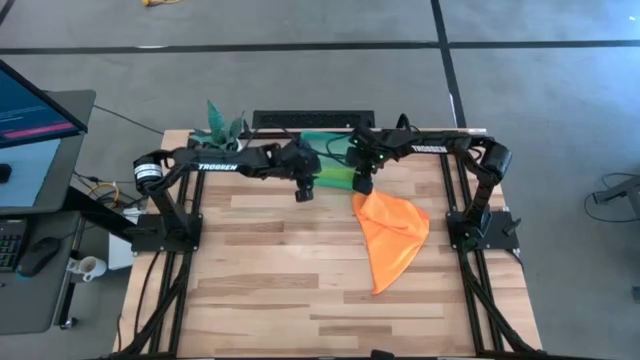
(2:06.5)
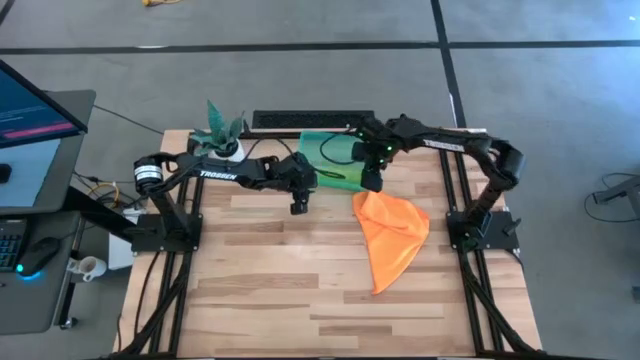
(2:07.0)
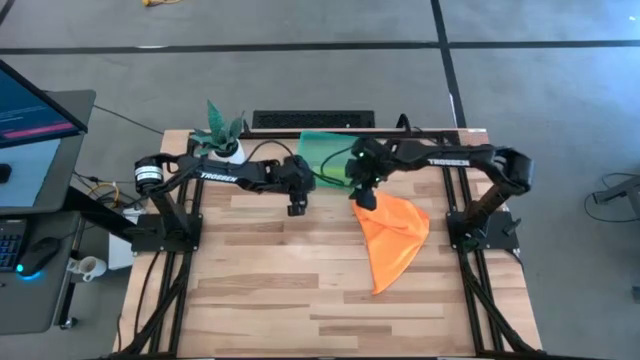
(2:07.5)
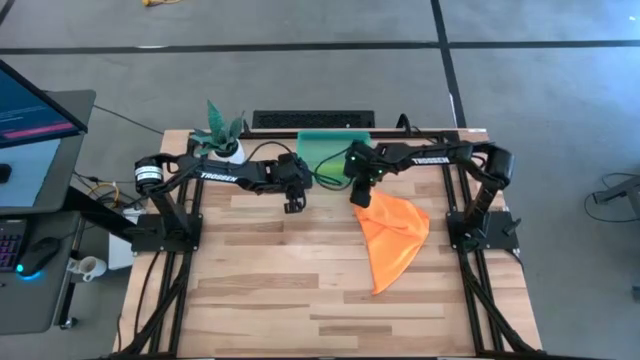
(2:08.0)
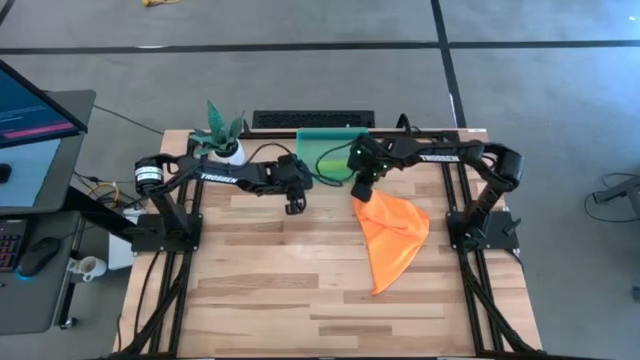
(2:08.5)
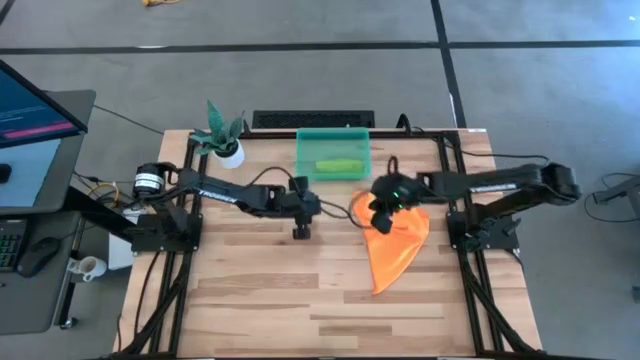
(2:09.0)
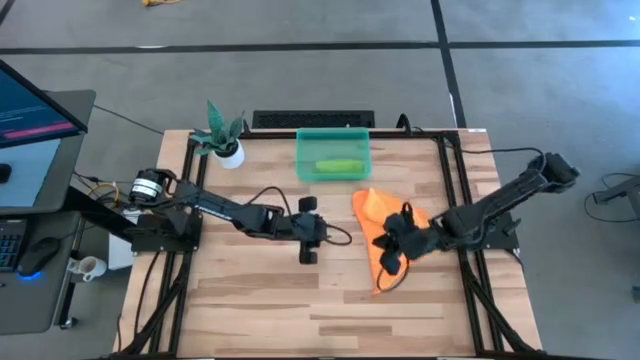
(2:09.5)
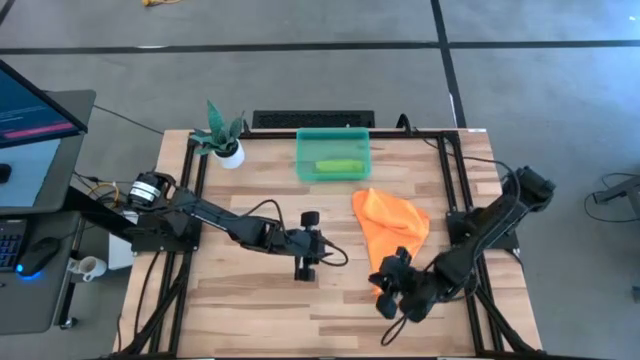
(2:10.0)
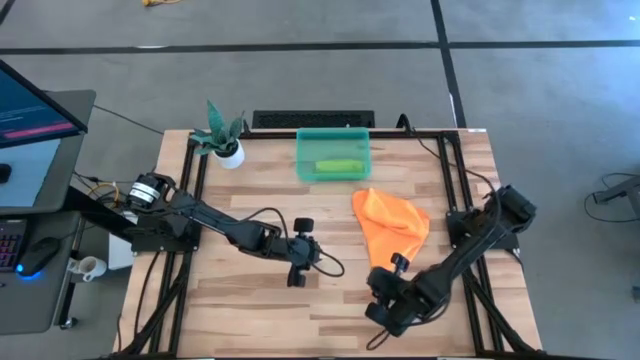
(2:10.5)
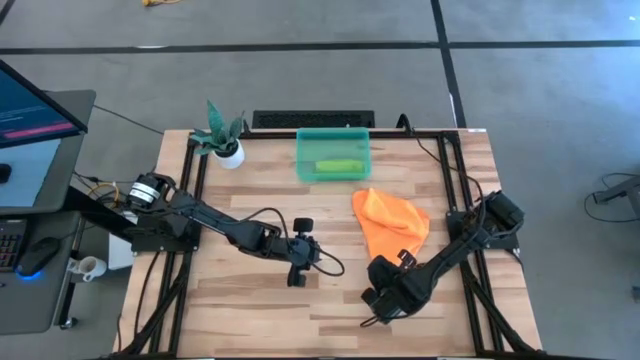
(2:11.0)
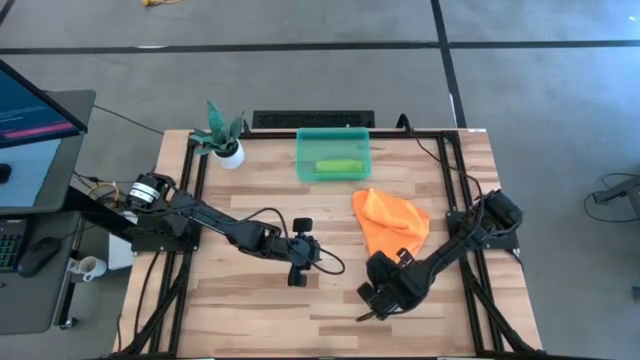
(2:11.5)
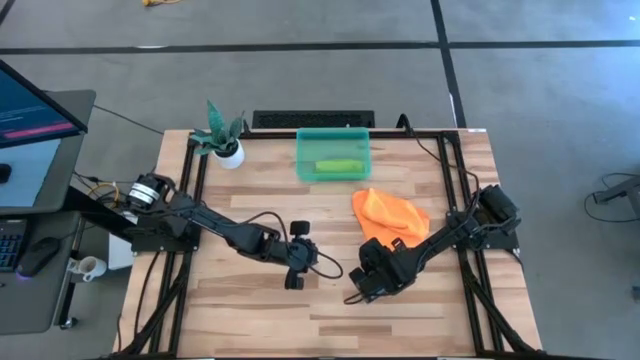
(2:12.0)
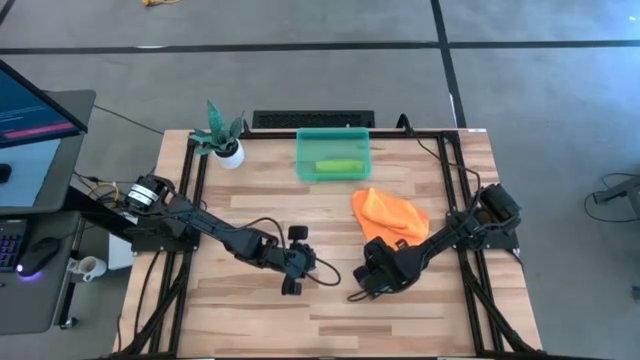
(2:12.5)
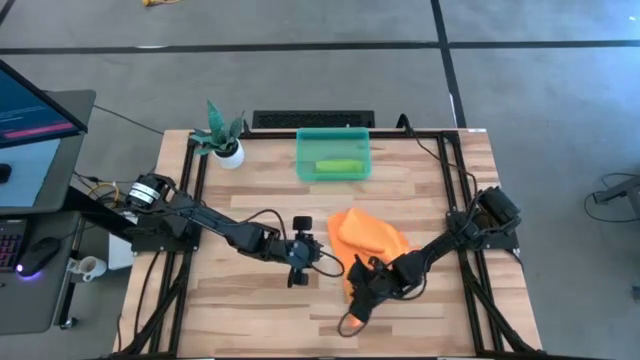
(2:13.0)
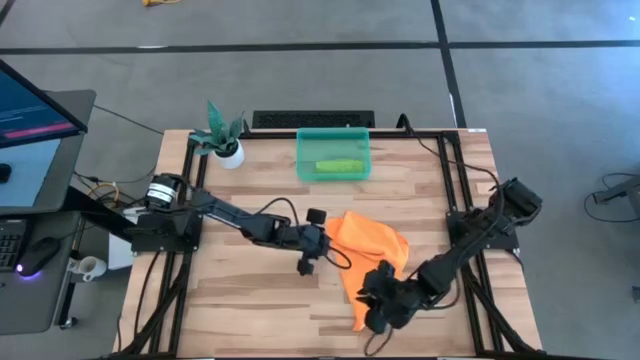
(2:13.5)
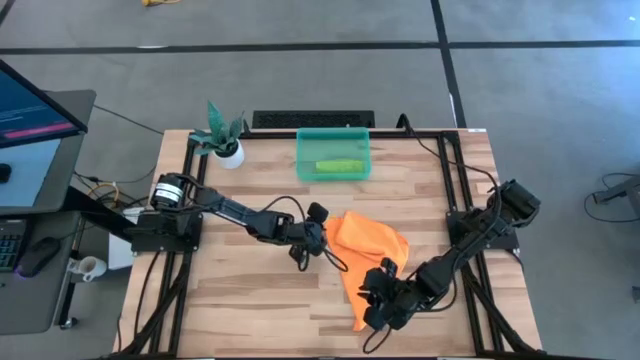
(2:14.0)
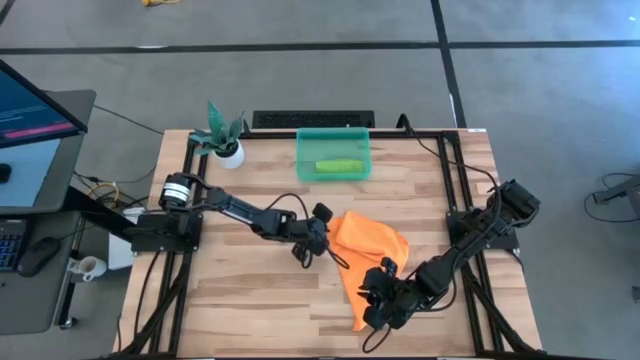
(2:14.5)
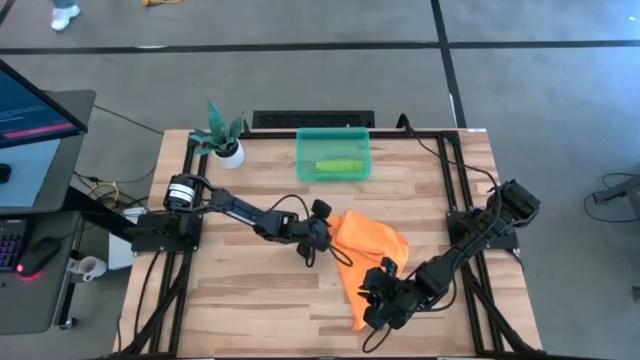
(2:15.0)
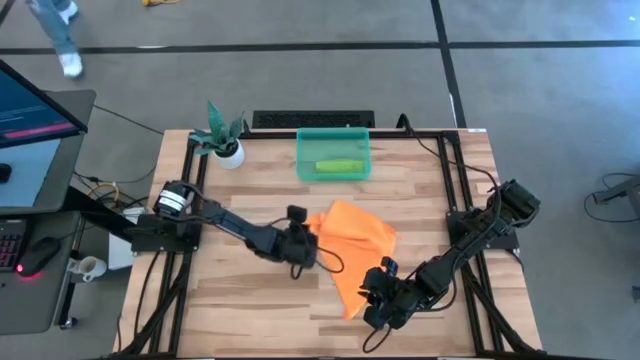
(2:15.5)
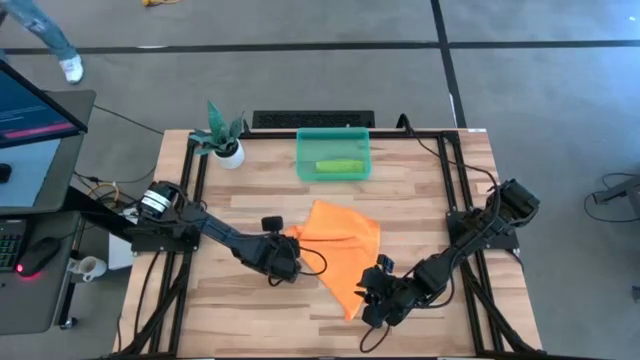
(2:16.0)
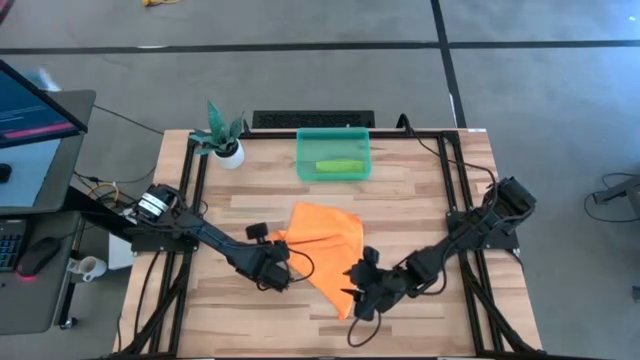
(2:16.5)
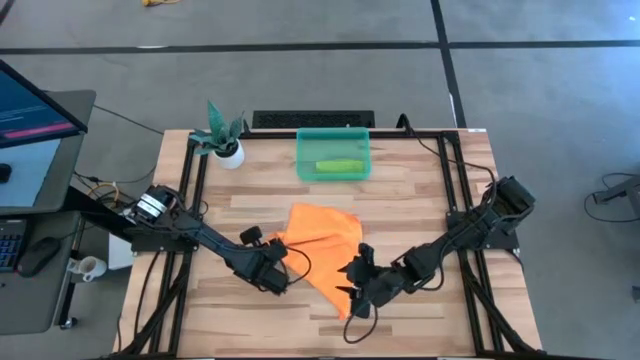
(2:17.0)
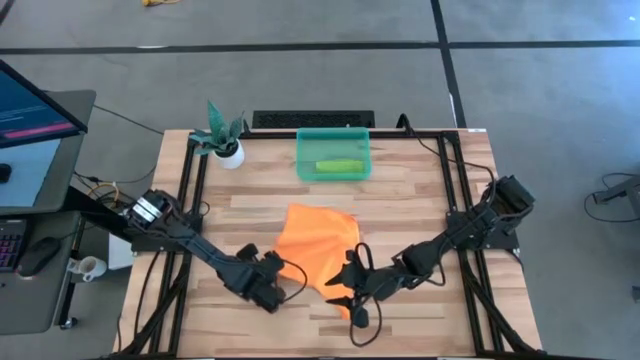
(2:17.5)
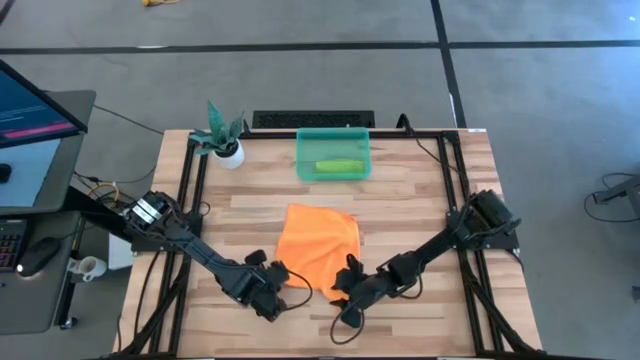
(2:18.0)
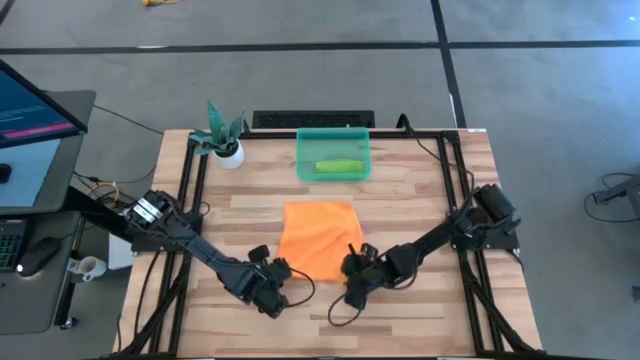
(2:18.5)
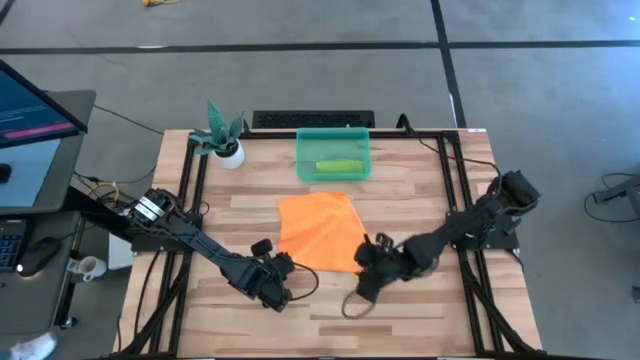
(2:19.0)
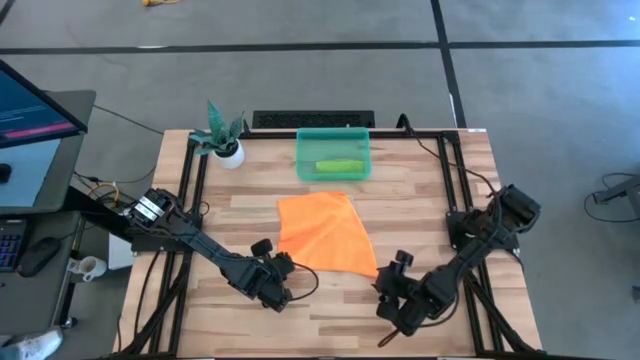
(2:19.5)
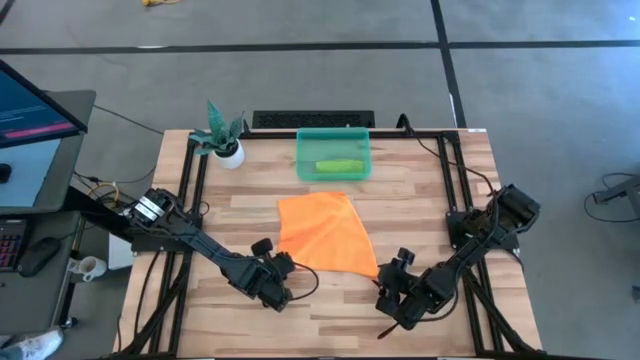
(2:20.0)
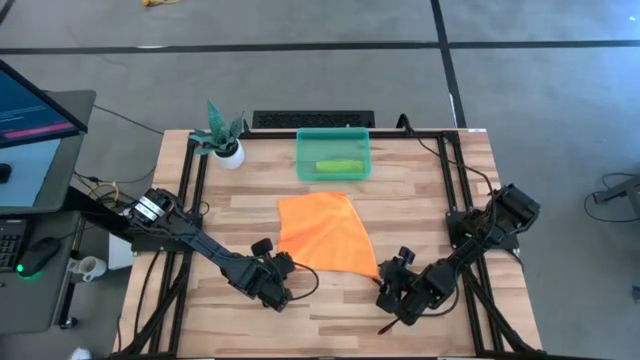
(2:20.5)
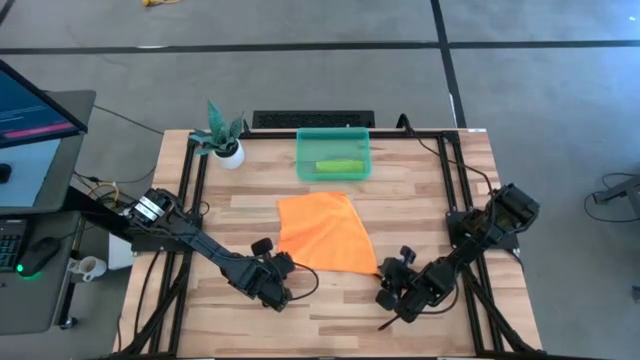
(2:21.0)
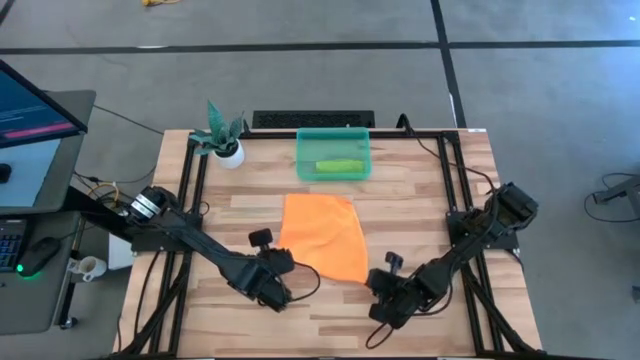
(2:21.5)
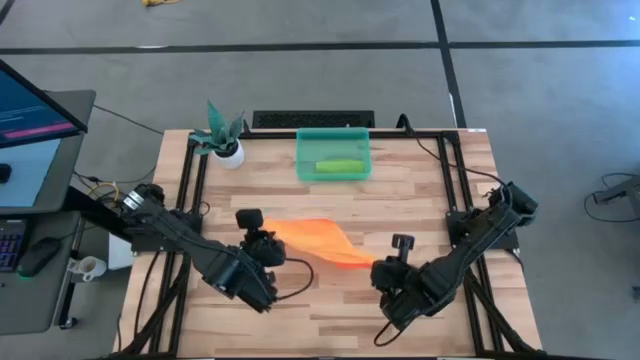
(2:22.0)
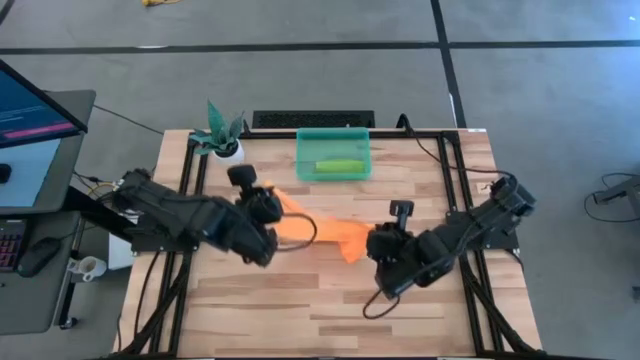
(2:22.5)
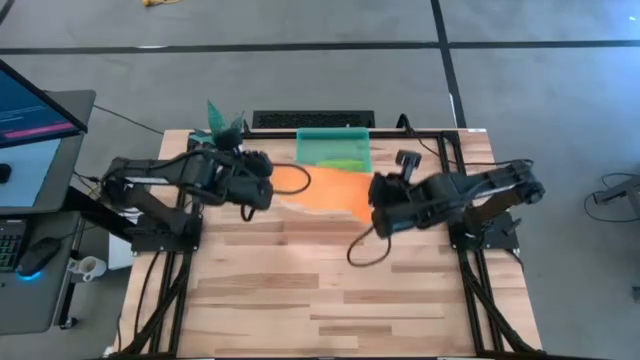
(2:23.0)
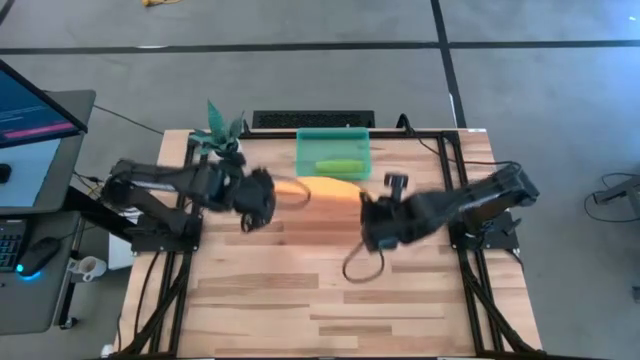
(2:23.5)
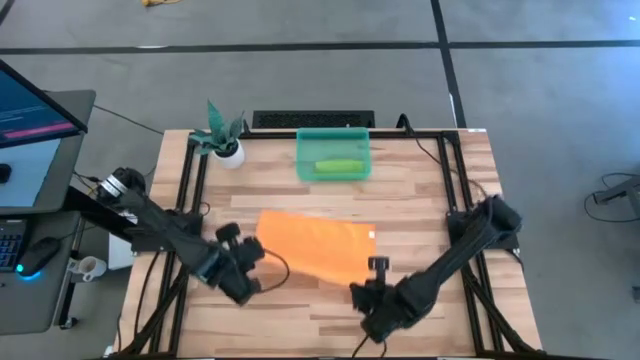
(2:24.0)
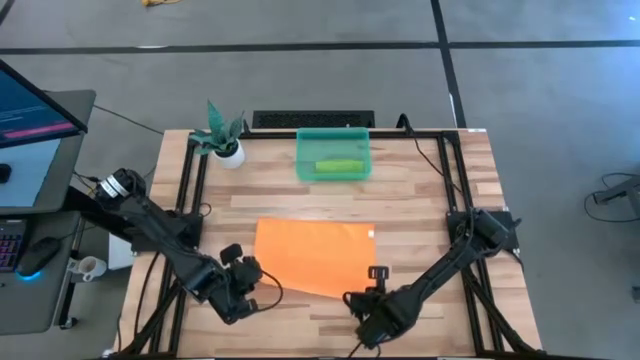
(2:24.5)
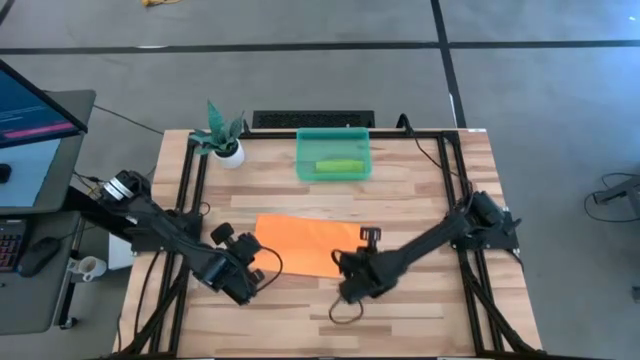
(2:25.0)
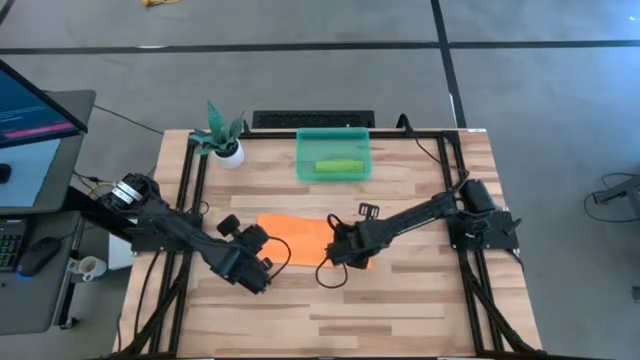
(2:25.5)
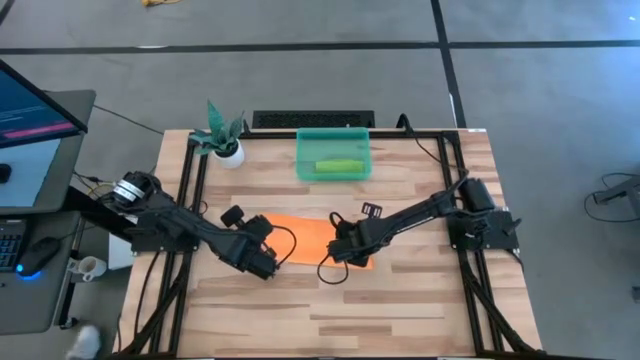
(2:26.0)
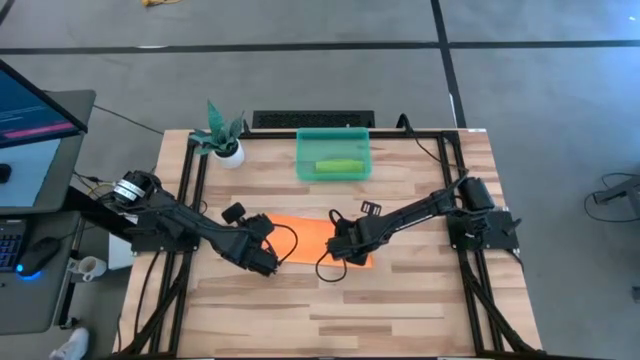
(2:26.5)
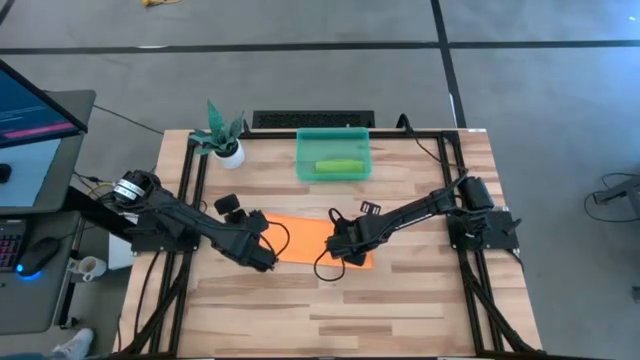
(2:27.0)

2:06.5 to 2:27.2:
Task: Roll towel into tight, uniform cylinder
Roll the orange microfiber towel

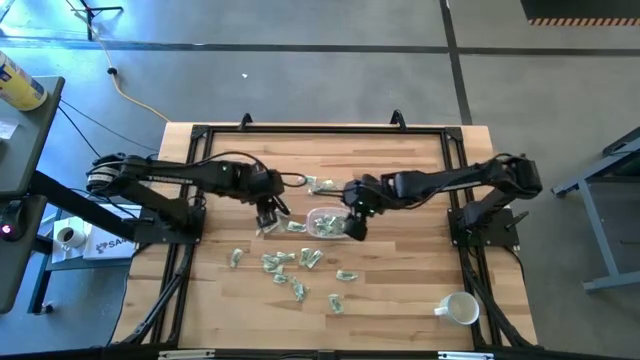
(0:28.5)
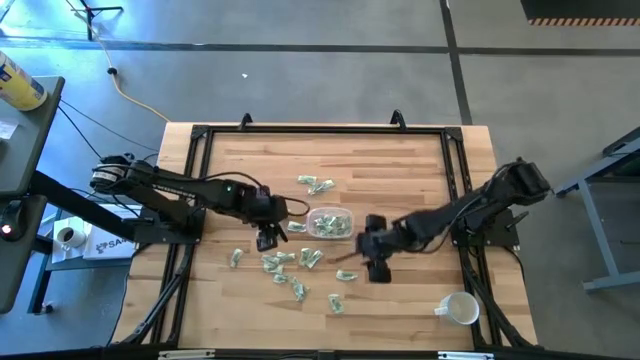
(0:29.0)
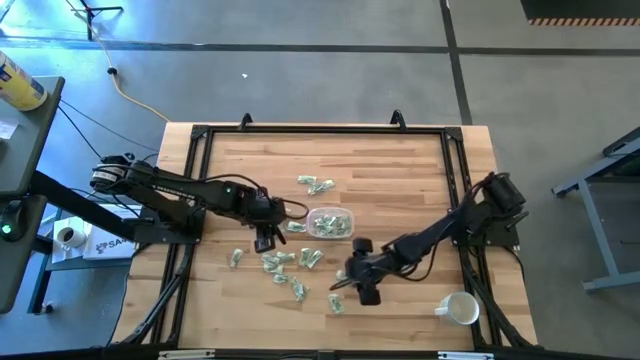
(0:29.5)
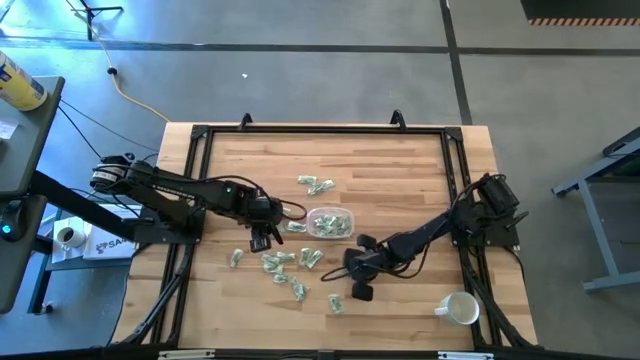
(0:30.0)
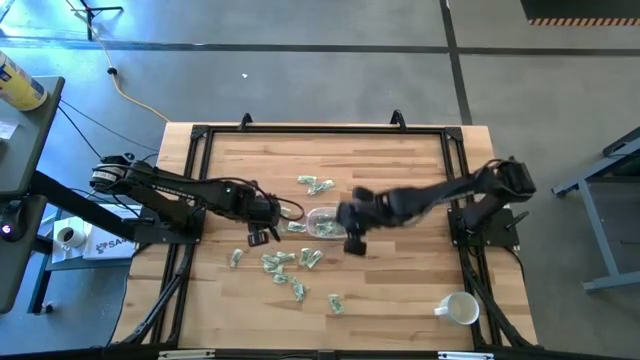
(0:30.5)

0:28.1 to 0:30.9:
Task: Pick and place Stevia / Truvia into bins
Put the stevia packet into the transparent container
